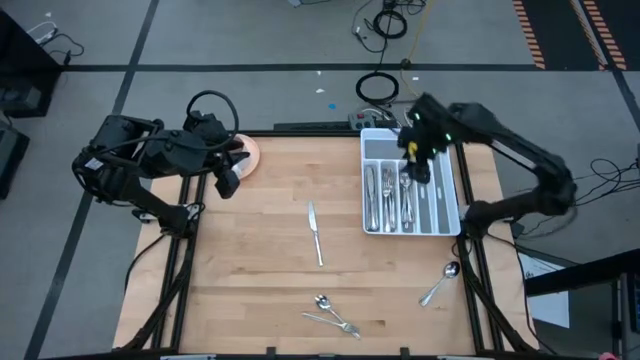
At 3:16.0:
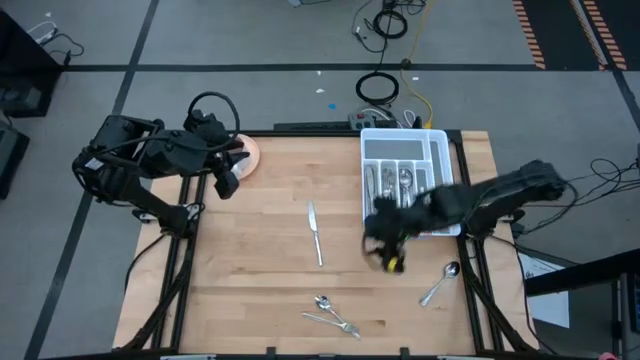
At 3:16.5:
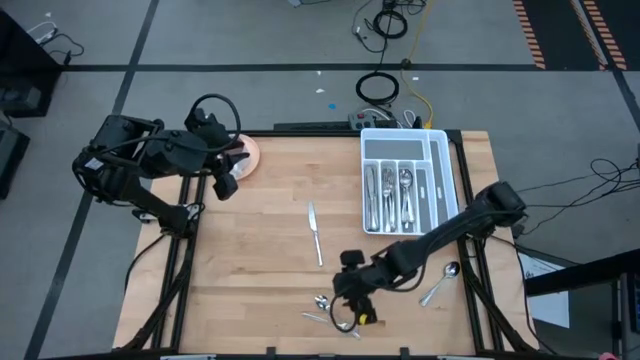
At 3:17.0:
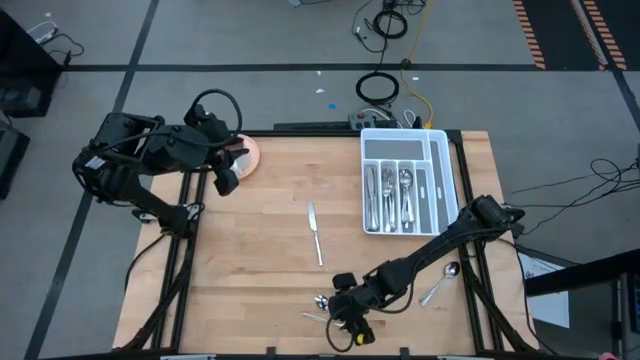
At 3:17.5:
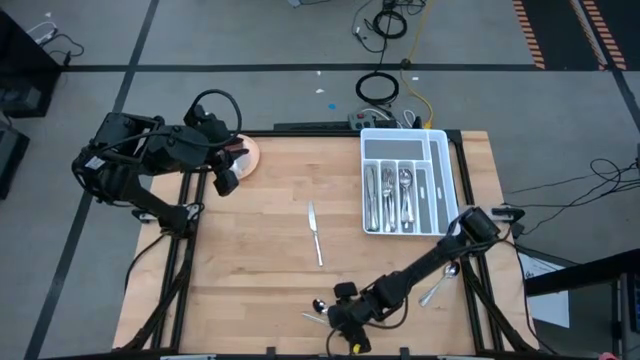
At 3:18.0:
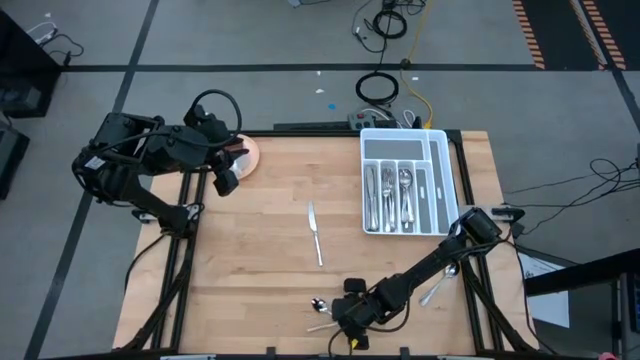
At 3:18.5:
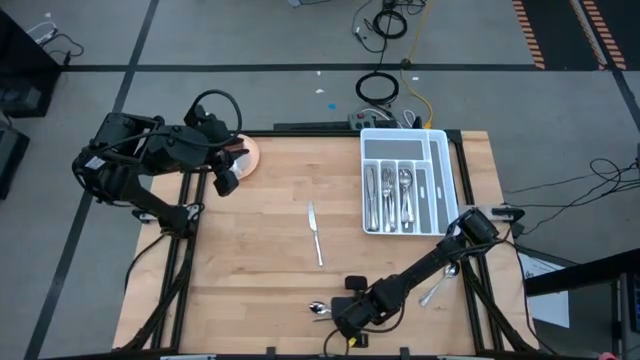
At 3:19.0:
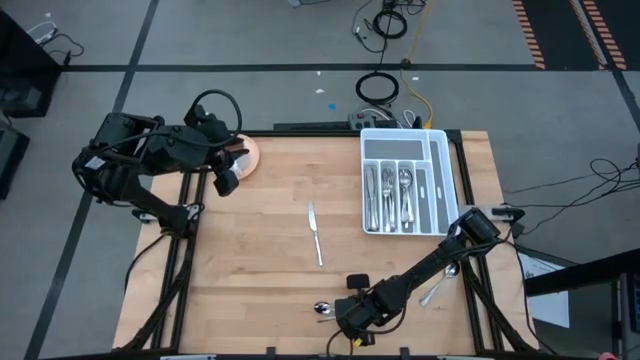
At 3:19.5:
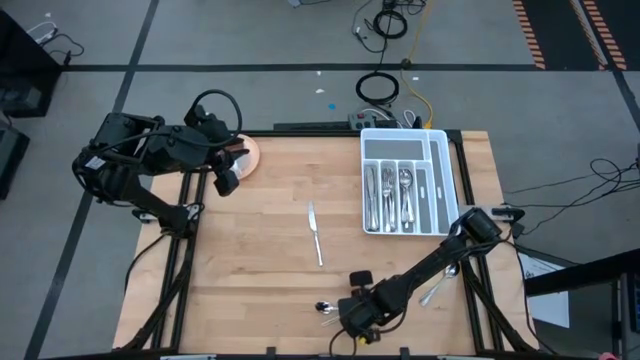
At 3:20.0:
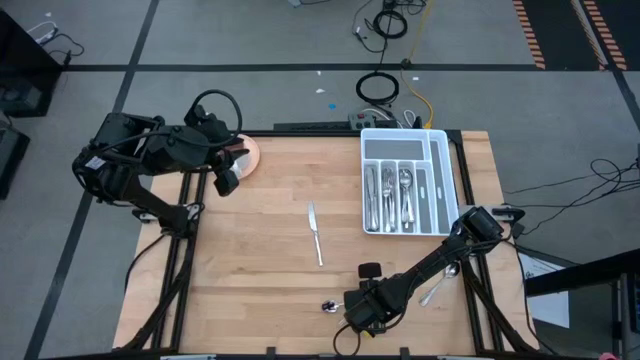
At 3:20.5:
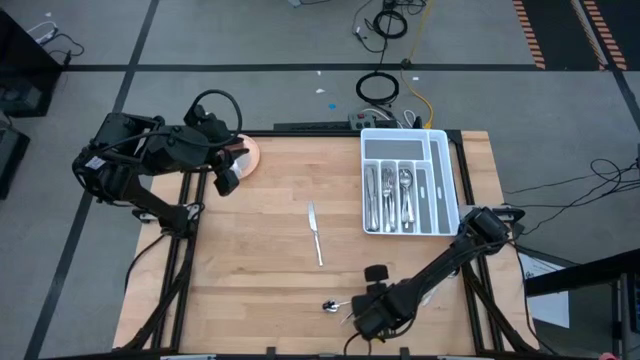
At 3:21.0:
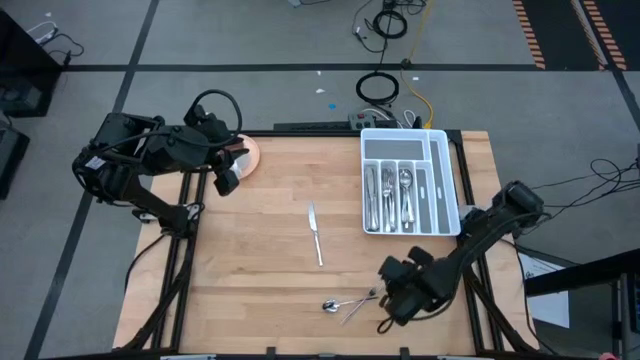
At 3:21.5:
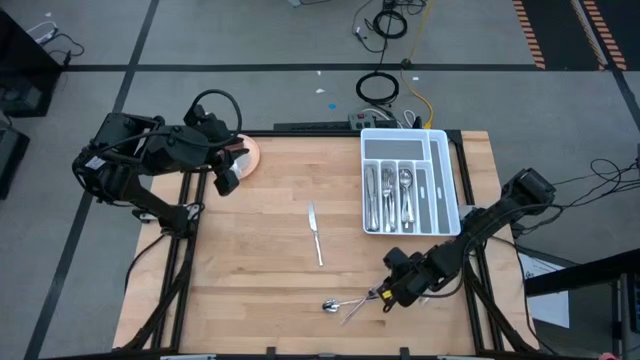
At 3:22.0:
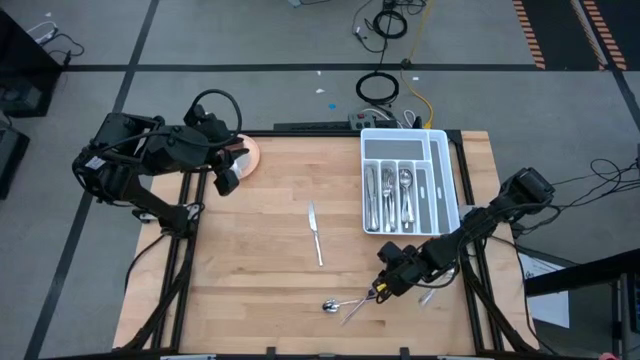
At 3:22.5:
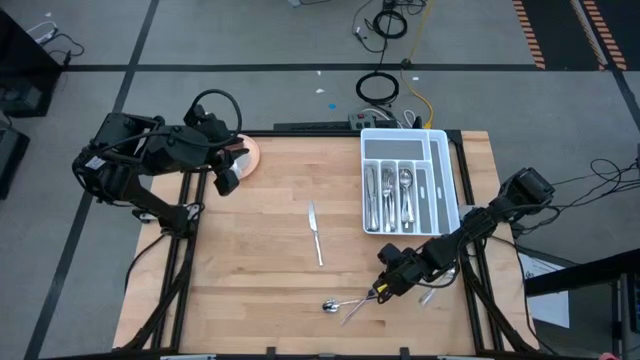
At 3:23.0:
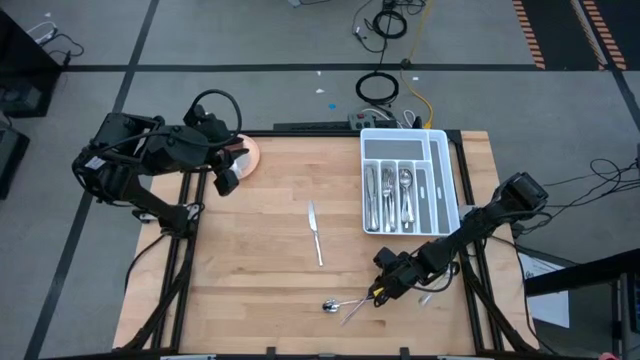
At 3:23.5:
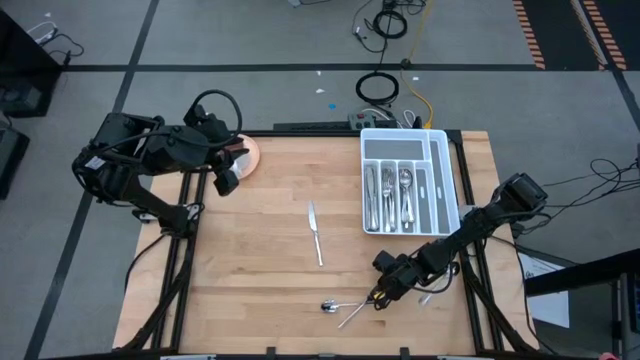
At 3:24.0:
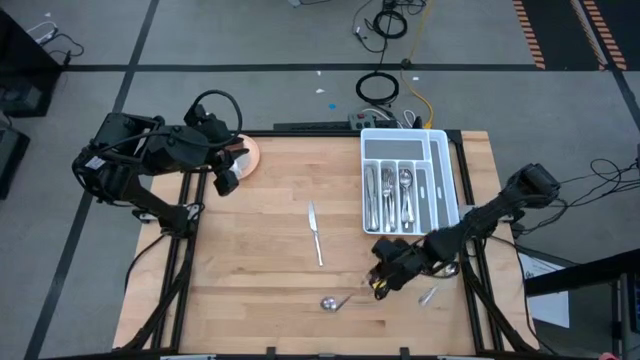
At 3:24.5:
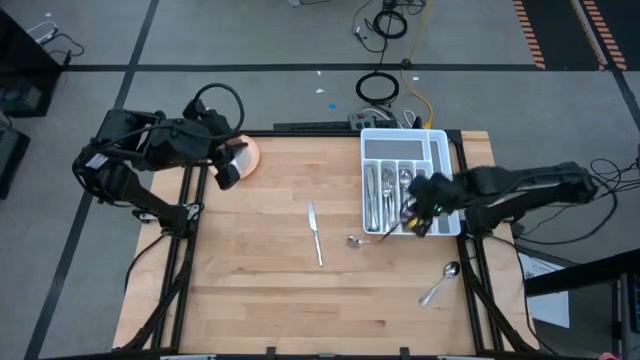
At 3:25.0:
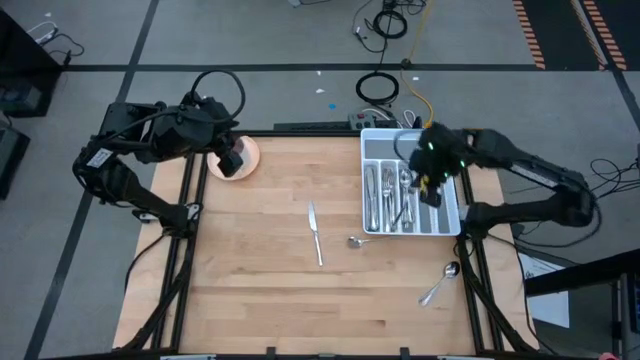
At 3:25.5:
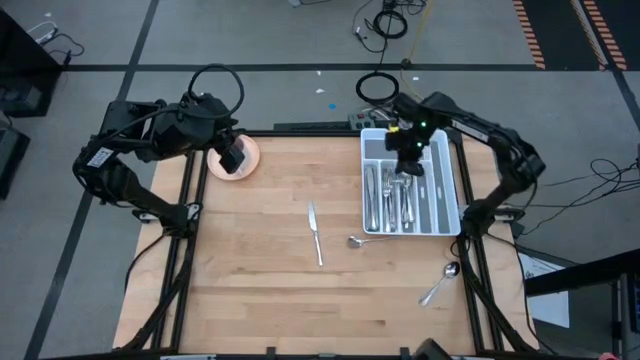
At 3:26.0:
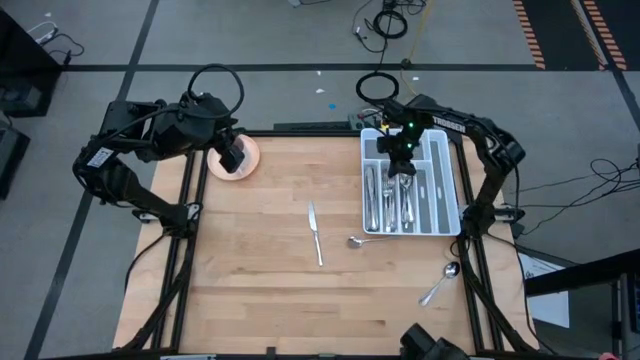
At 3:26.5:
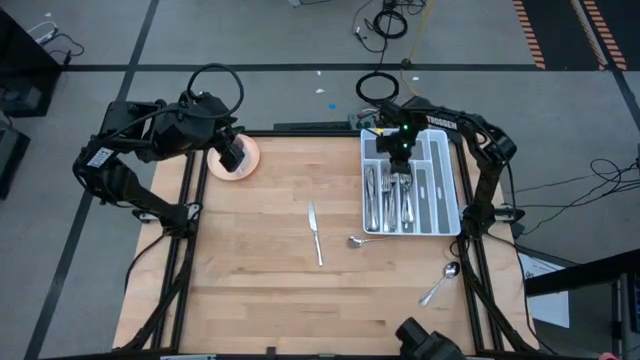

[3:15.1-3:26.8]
Task: Sort silverware
Put the silver fork into the white cutlery tray

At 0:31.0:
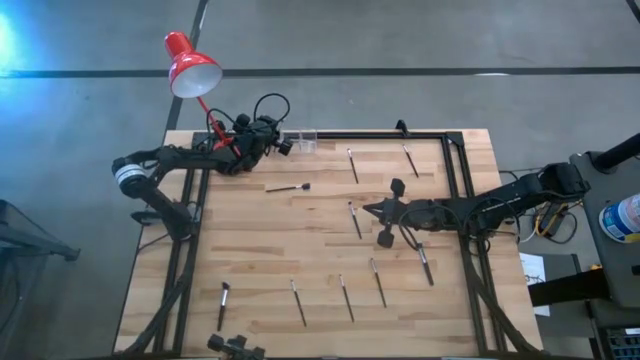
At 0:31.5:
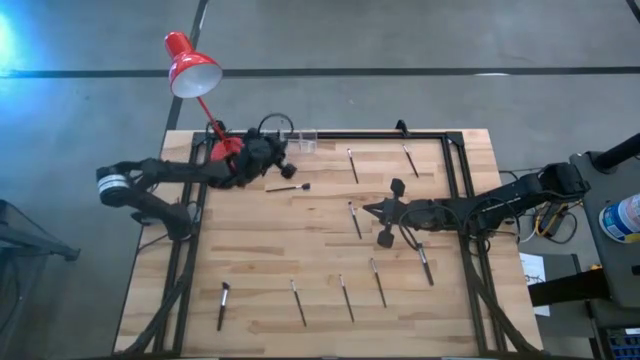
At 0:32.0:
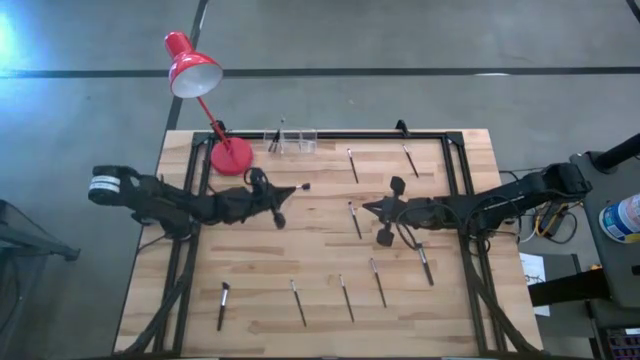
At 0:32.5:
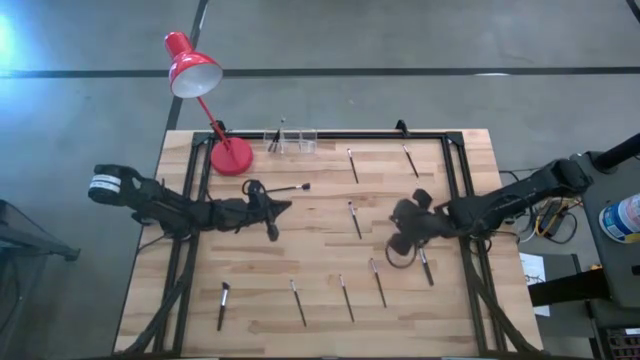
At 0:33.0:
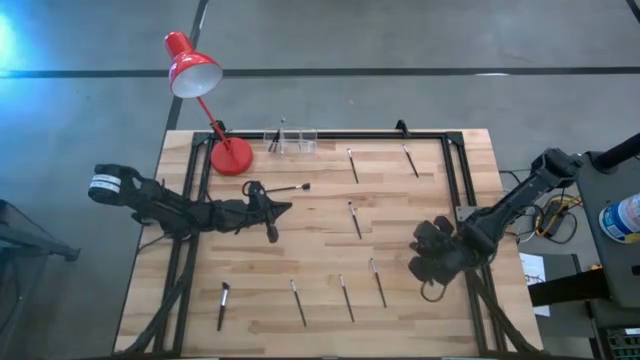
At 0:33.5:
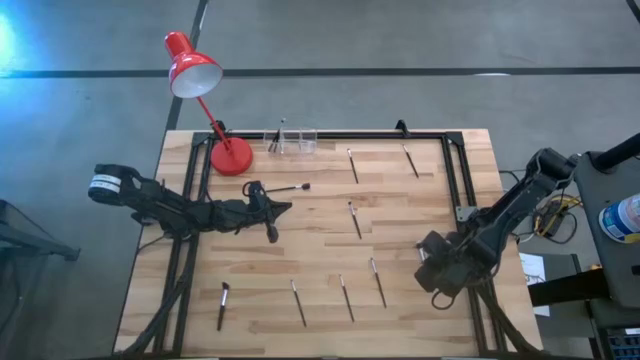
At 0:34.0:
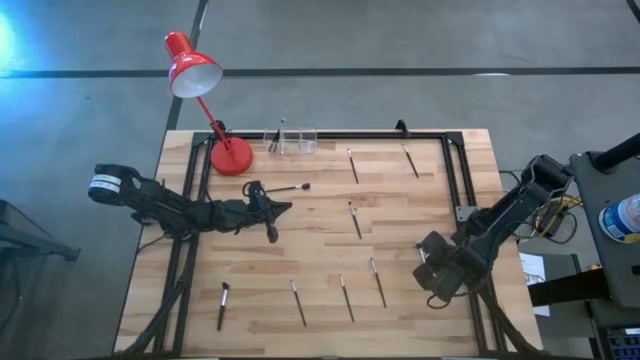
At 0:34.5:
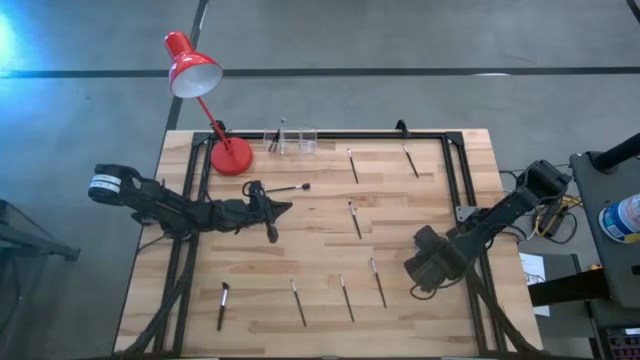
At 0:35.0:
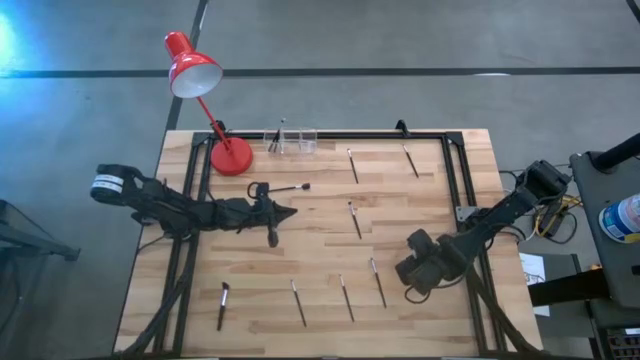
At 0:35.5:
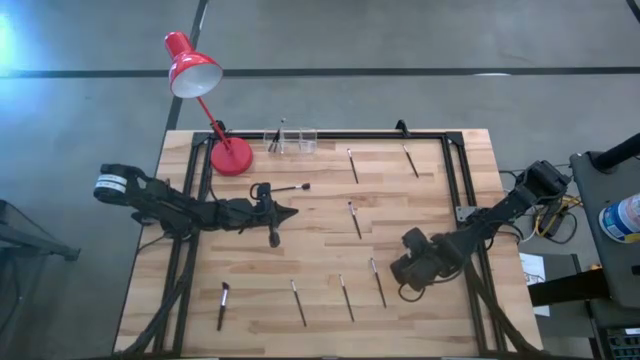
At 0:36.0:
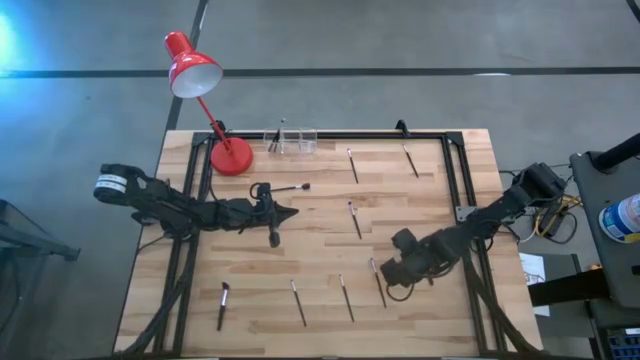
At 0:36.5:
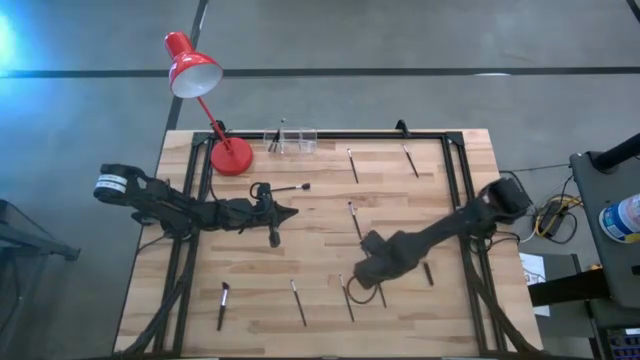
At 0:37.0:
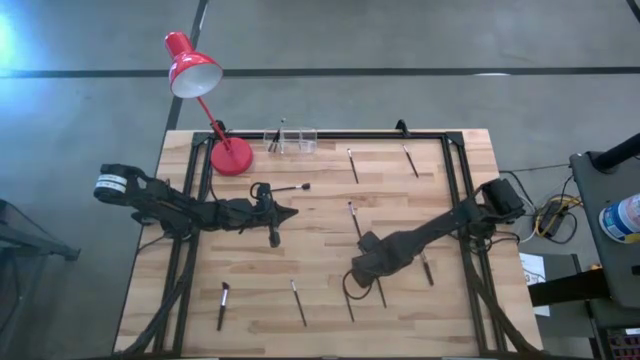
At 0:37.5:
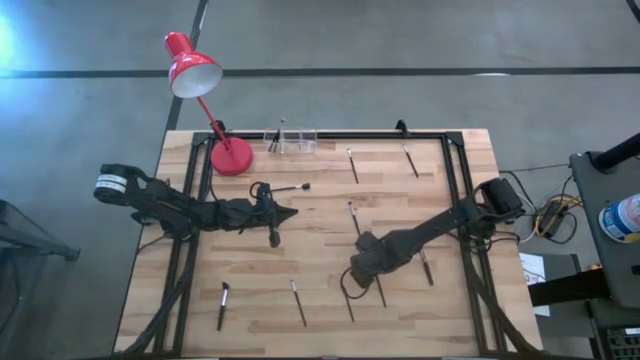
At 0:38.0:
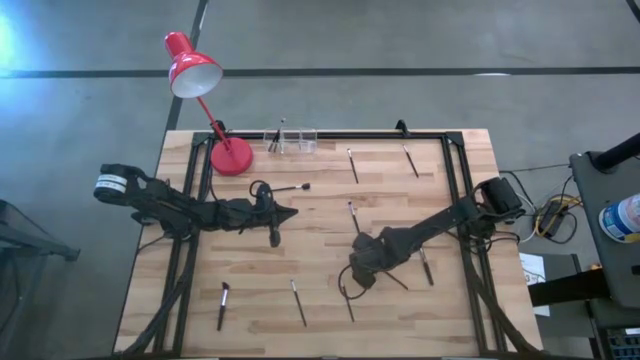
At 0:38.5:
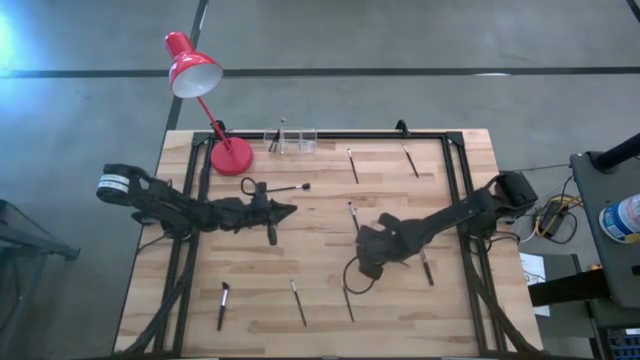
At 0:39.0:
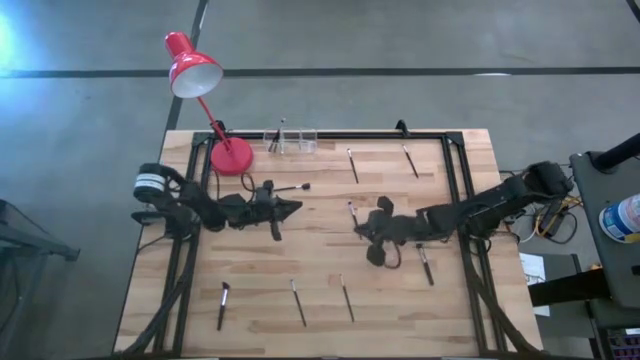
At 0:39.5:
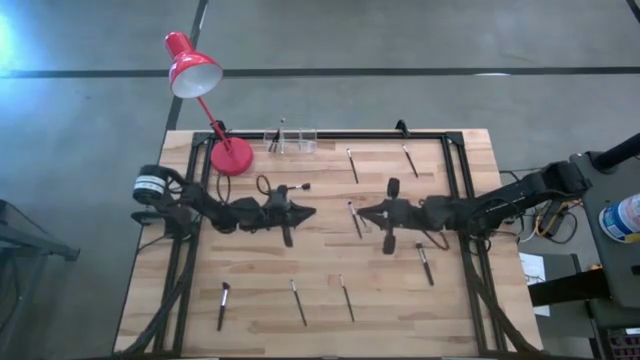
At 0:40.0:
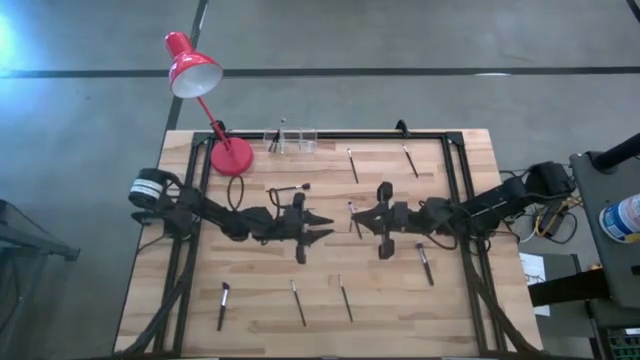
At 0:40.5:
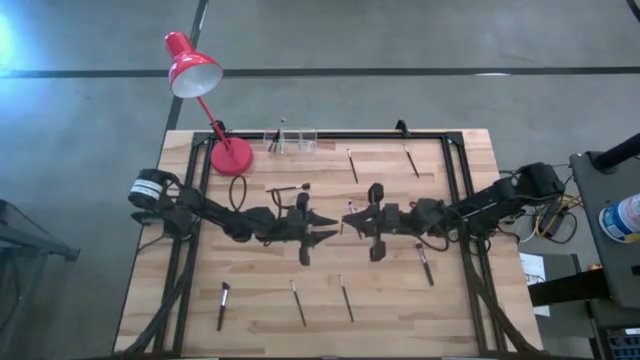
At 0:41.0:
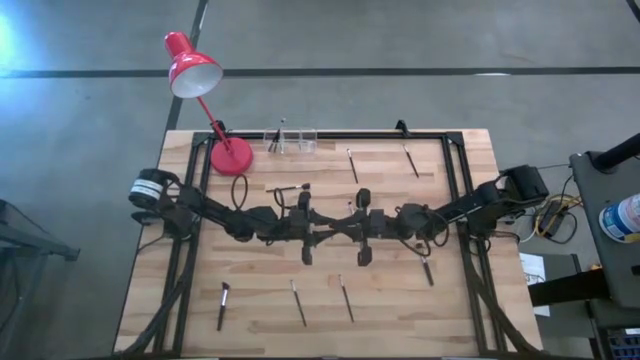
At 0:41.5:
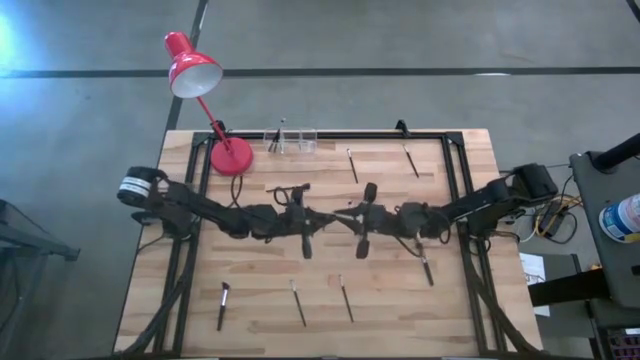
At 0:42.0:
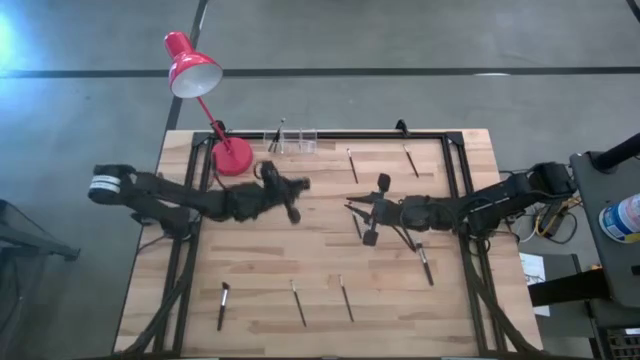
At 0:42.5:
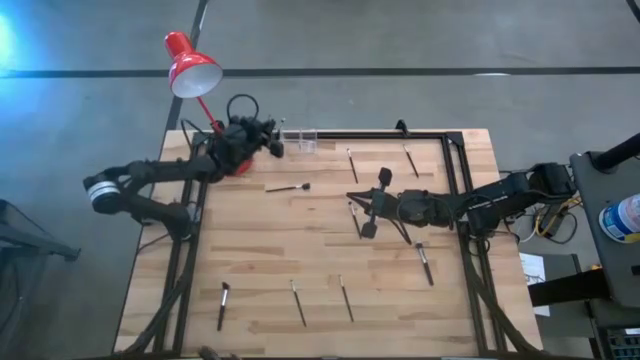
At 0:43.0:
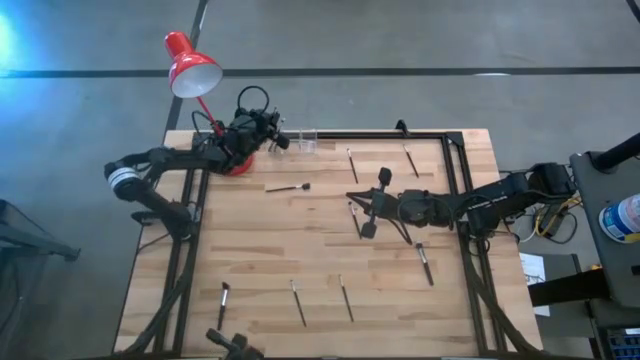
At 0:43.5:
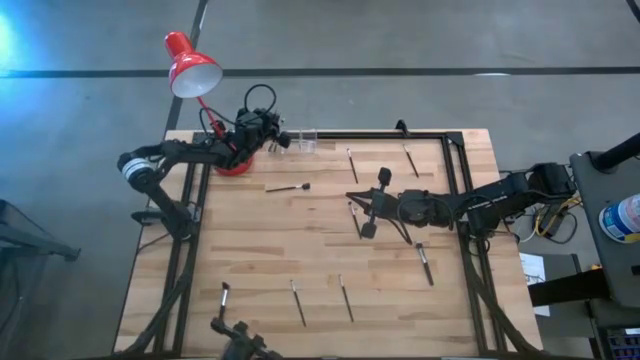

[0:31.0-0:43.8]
Task: Pick & Place Makeup Supplies
Put the makeup brush into the transparent organizer
